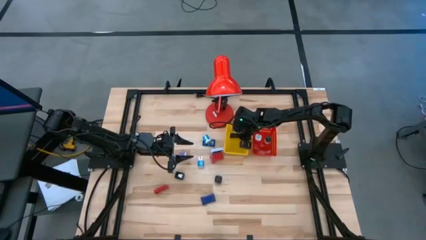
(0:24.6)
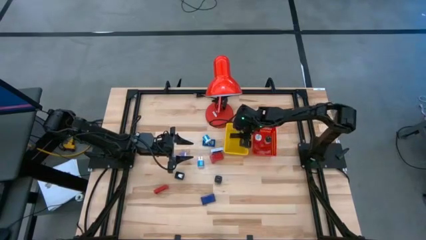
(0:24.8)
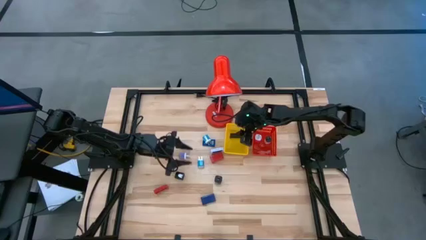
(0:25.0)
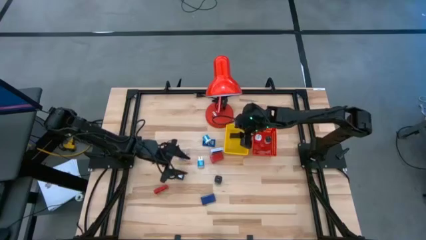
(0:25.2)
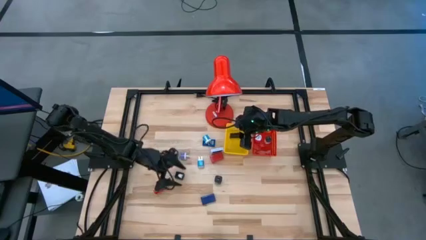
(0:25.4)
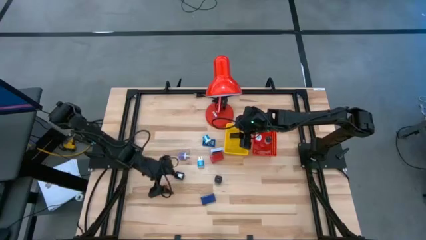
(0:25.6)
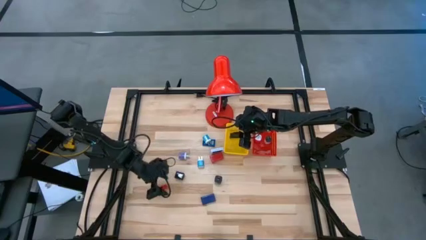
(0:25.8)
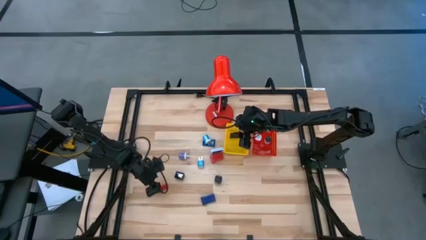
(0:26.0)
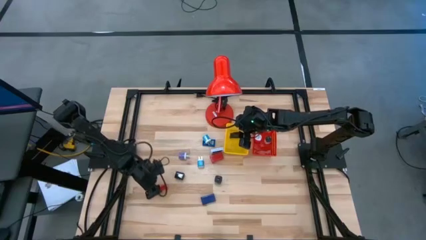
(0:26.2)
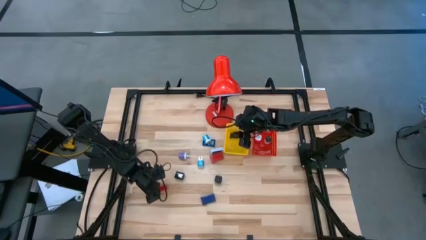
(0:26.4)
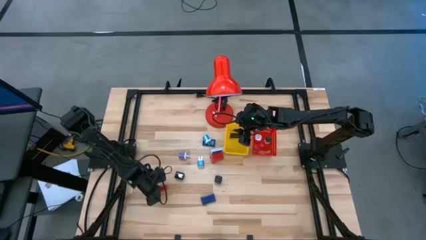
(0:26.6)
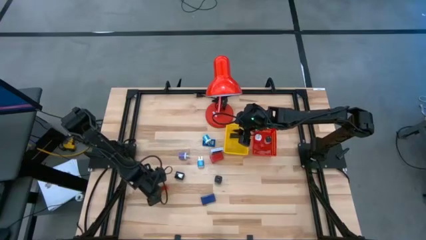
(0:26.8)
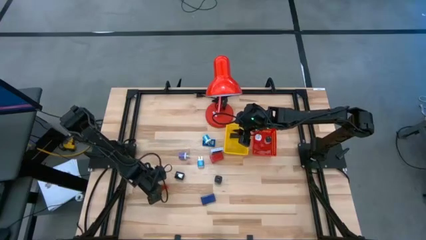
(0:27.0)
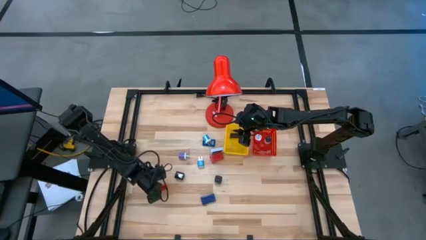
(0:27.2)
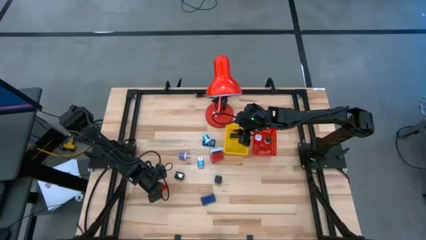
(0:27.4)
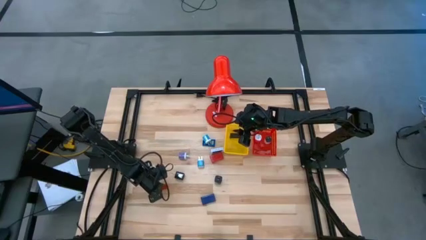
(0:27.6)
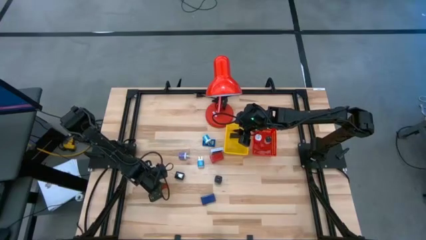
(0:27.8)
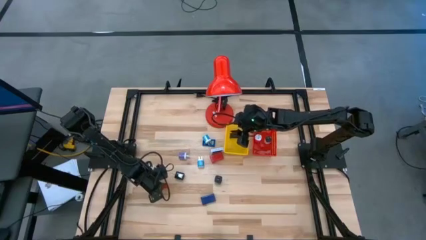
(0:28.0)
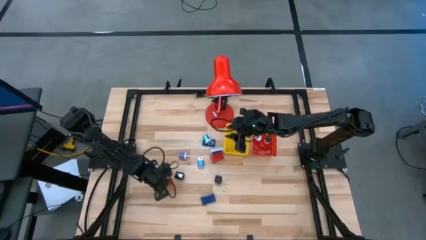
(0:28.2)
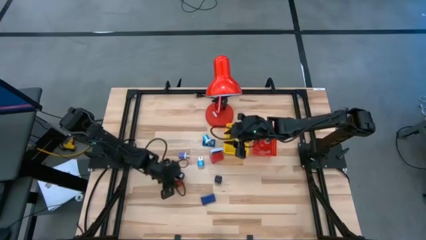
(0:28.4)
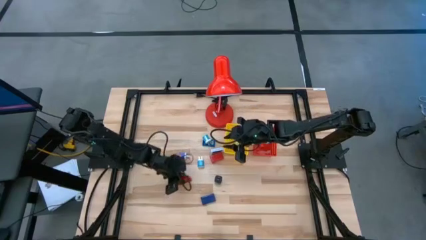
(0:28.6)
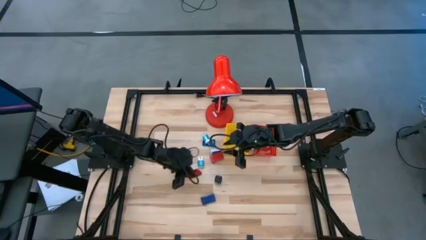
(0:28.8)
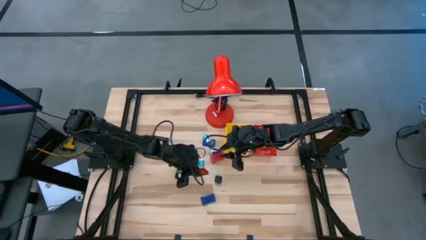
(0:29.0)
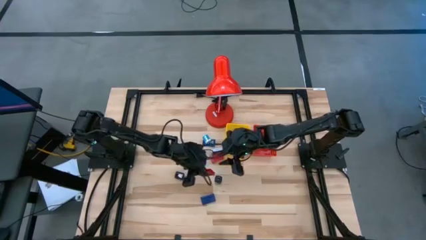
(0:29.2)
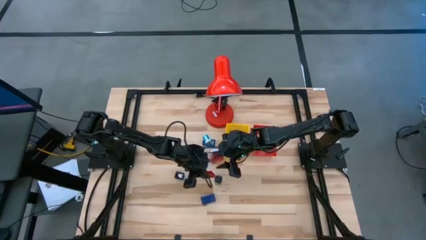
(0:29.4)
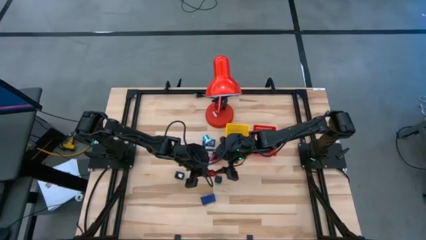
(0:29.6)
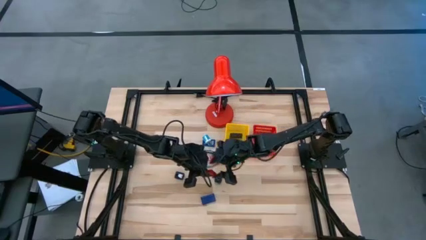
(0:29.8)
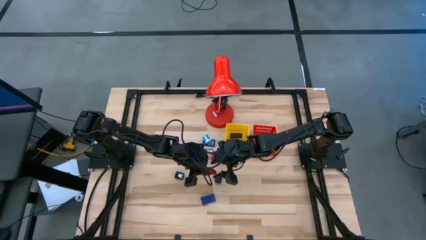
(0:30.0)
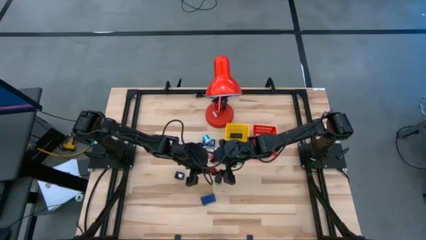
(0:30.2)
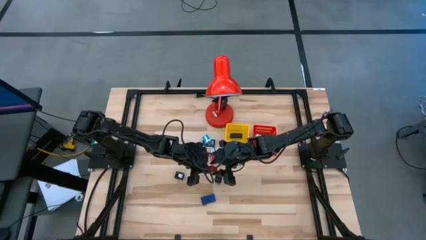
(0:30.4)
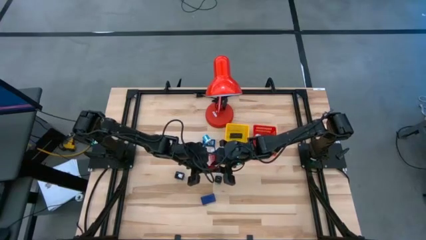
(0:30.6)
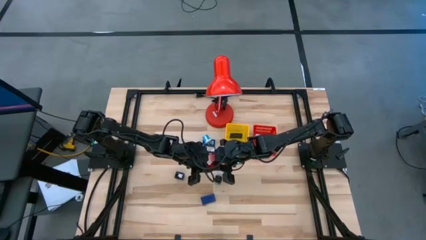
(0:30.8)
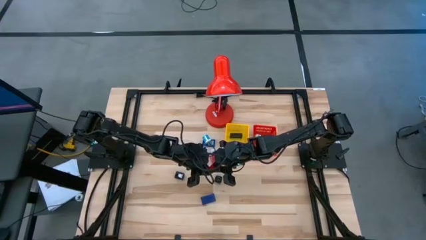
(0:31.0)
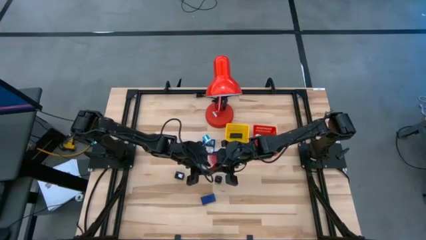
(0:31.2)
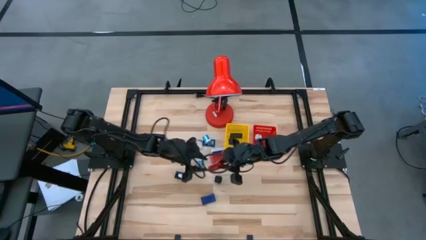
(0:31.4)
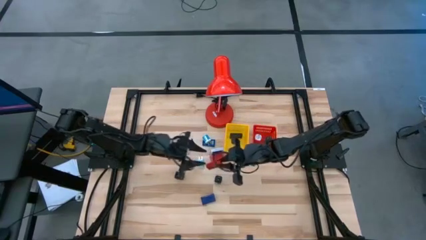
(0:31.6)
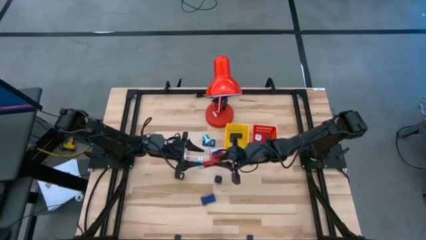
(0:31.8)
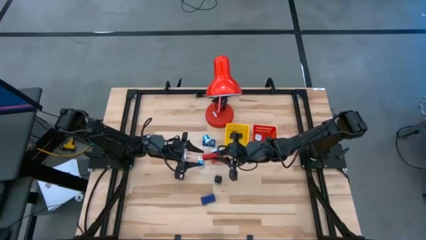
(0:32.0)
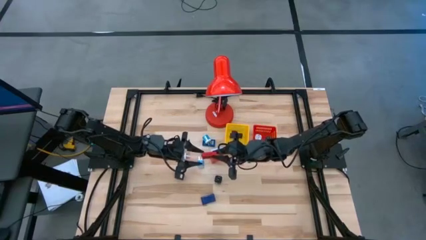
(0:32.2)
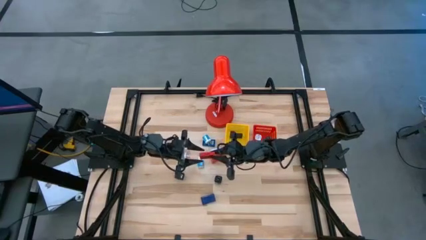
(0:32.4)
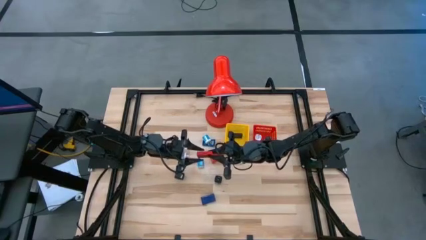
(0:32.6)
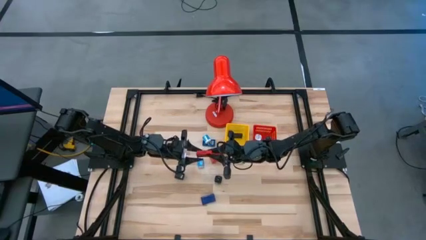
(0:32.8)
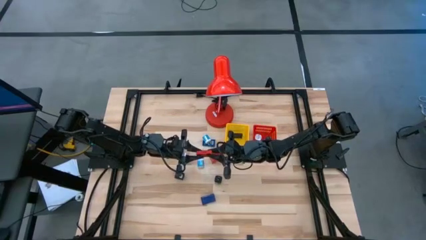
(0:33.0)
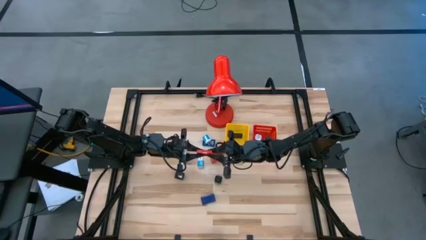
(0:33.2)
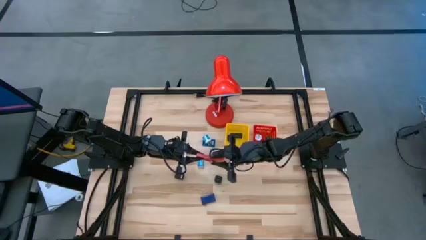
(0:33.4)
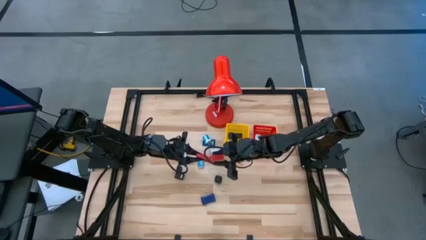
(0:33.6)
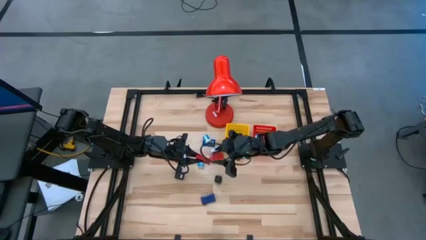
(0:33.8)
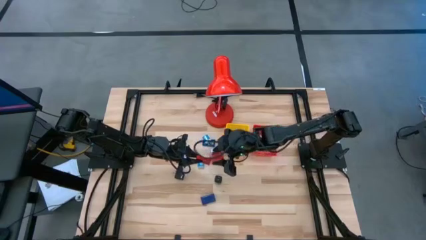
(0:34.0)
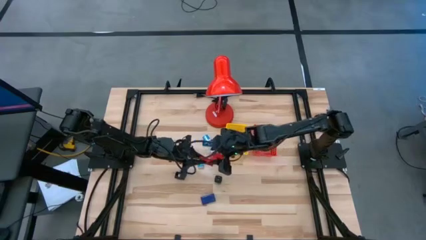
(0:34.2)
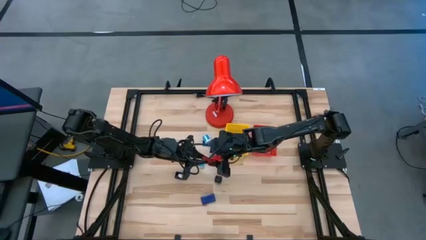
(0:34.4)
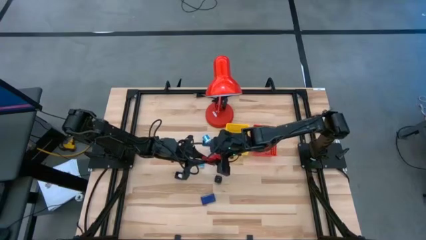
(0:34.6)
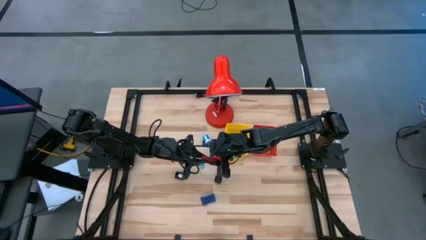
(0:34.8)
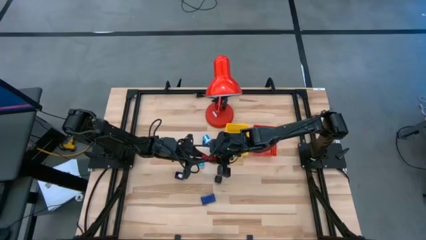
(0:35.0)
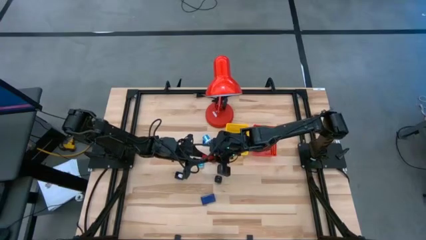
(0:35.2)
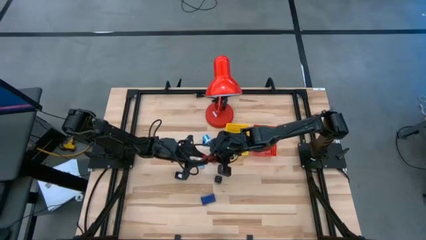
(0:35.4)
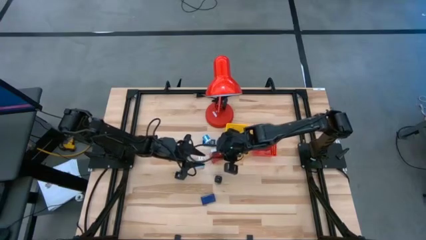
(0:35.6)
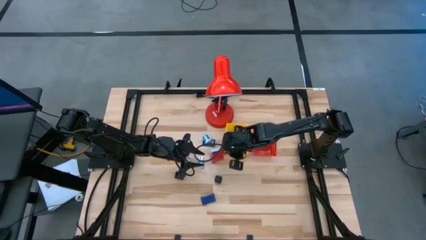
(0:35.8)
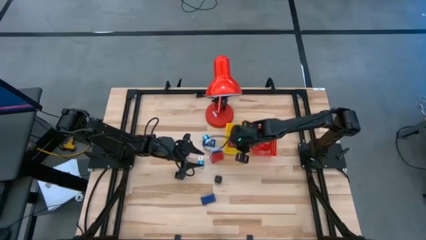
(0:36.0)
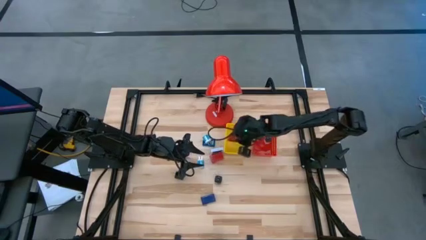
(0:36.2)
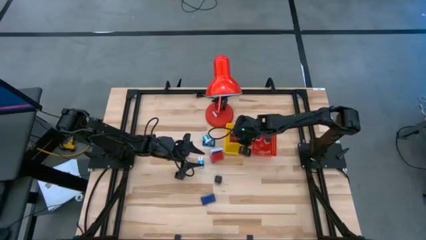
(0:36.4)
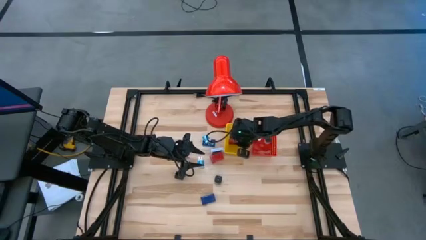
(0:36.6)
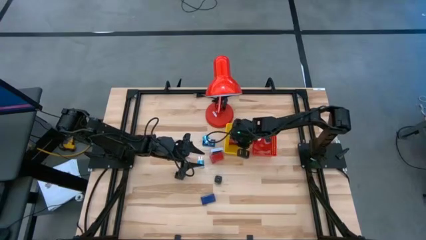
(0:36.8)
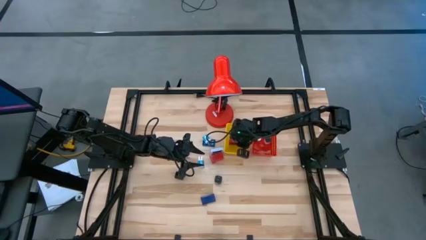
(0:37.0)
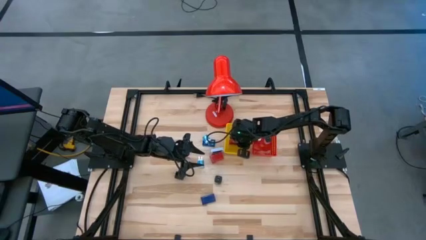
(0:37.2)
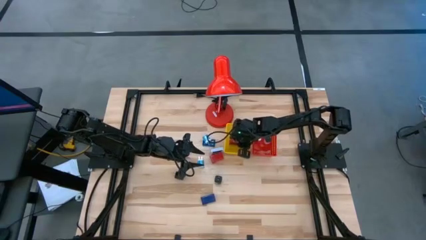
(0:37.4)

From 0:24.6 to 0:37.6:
Task: Pick & Place Office items
Put the bottom red digital clock into the yellow bin

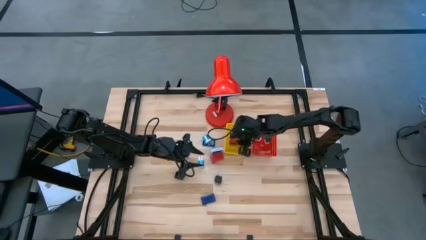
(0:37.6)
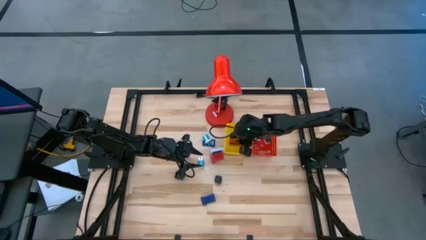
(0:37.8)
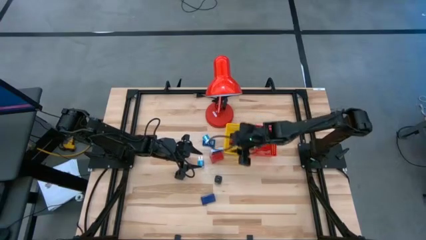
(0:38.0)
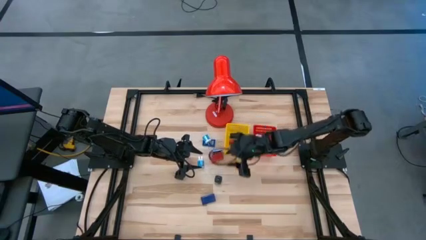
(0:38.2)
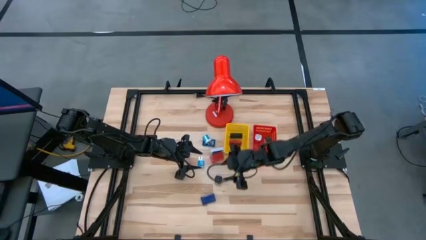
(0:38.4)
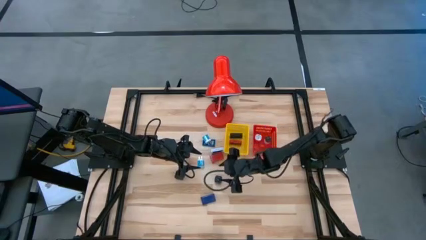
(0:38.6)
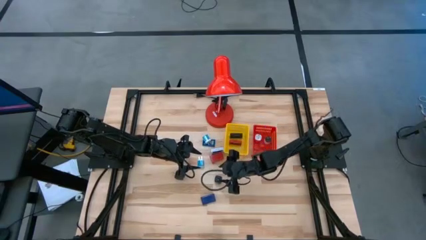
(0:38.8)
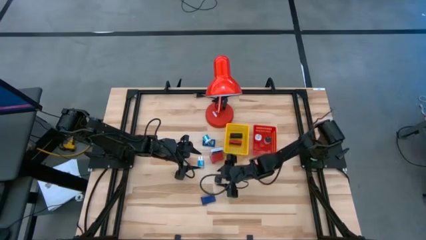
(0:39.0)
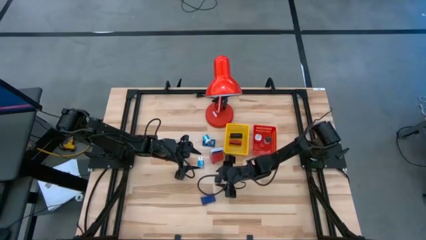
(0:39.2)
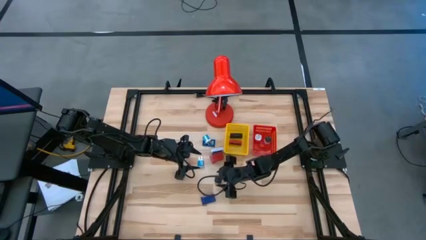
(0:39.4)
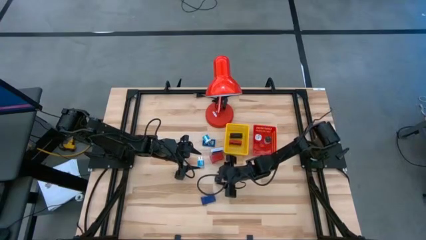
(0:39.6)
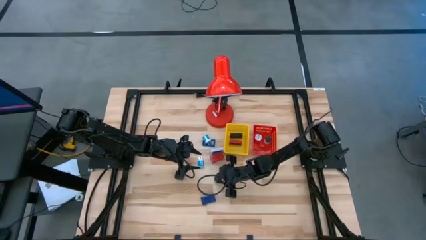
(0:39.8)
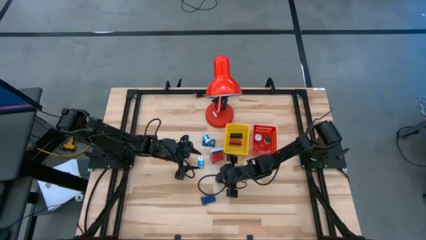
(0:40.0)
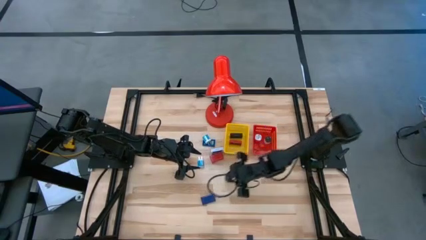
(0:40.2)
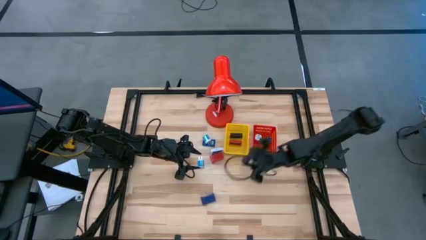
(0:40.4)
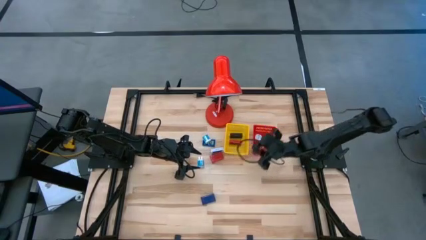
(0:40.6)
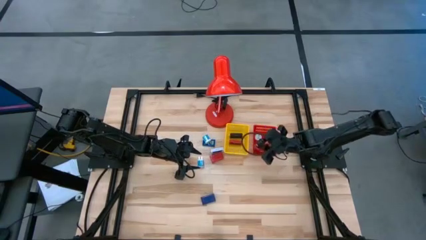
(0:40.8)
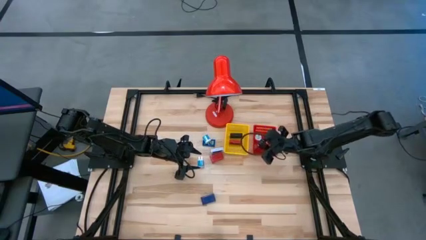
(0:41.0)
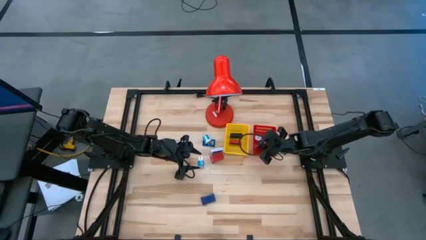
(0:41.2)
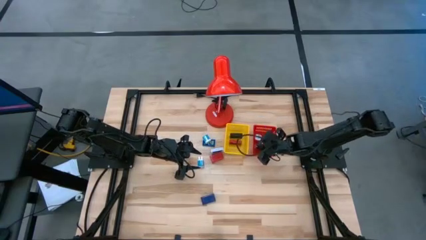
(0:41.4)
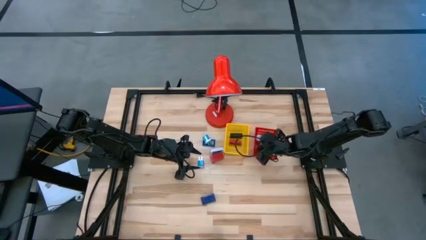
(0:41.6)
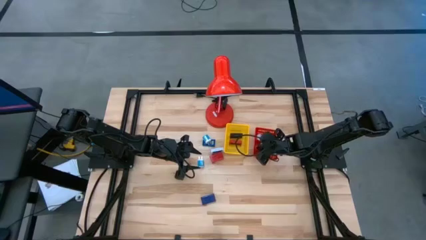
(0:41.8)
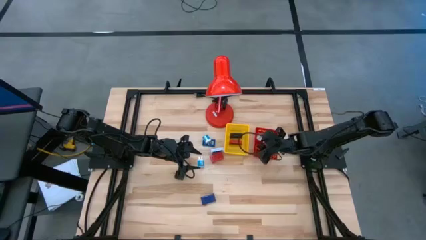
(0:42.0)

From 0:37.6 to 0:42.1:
Put the right black charger adapter into the red bin
